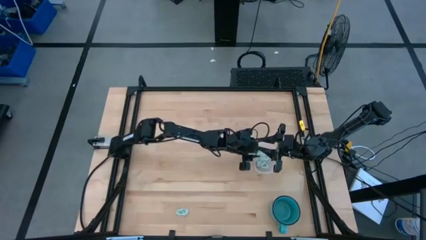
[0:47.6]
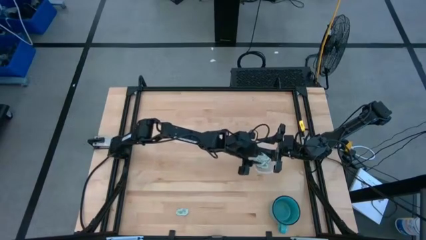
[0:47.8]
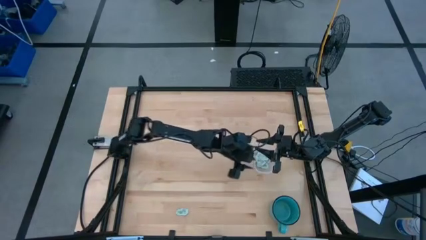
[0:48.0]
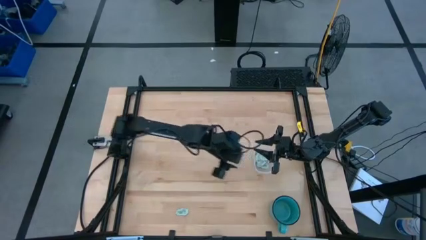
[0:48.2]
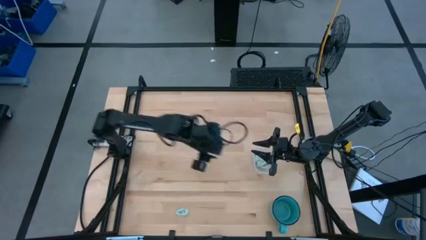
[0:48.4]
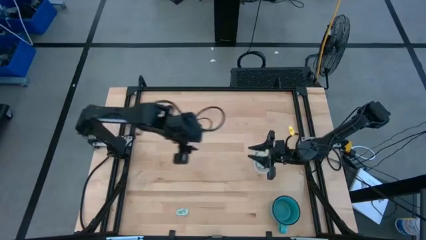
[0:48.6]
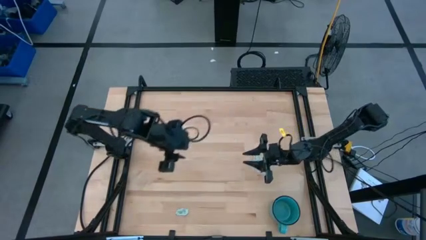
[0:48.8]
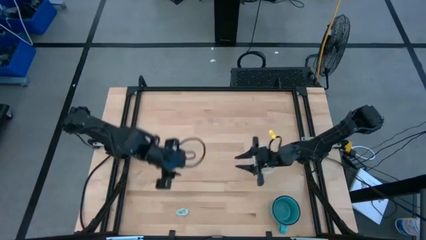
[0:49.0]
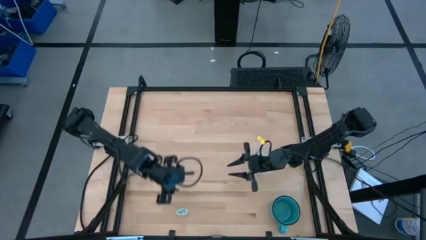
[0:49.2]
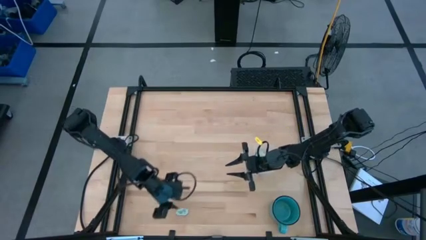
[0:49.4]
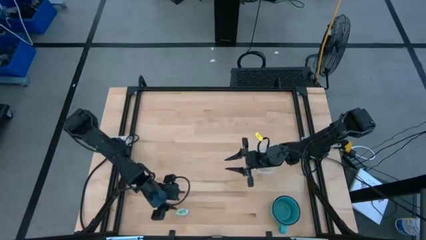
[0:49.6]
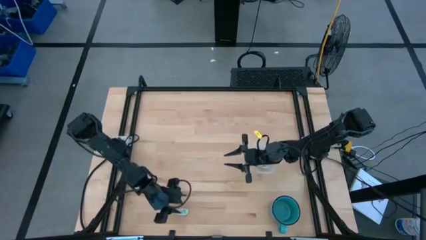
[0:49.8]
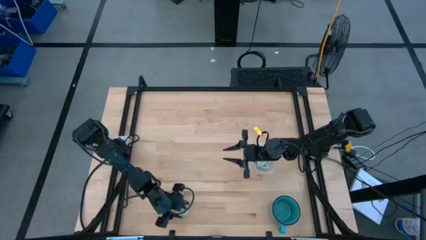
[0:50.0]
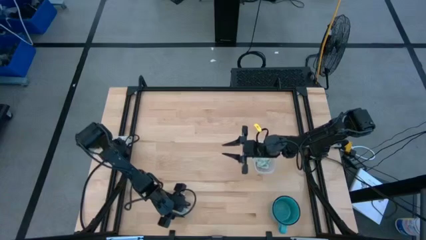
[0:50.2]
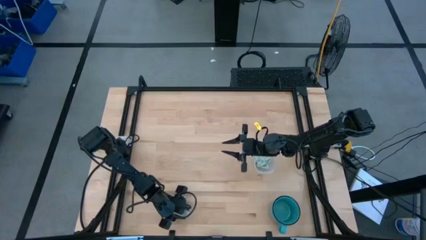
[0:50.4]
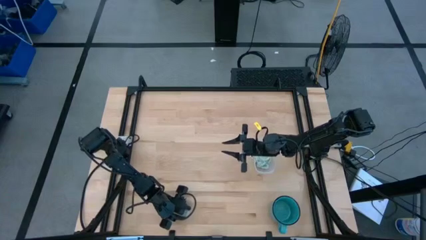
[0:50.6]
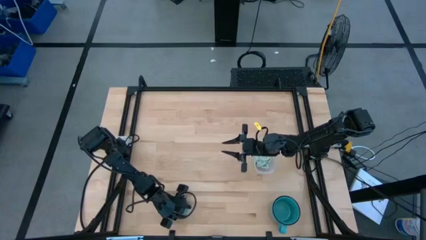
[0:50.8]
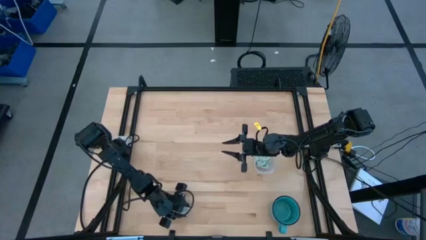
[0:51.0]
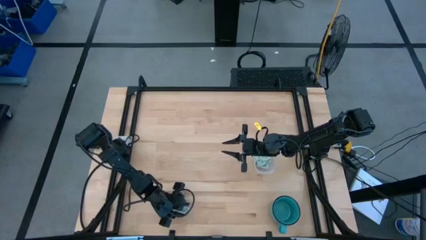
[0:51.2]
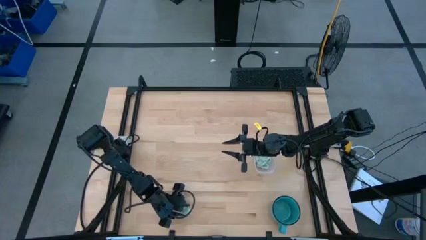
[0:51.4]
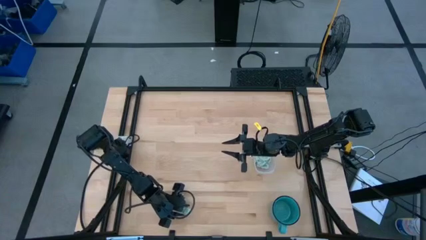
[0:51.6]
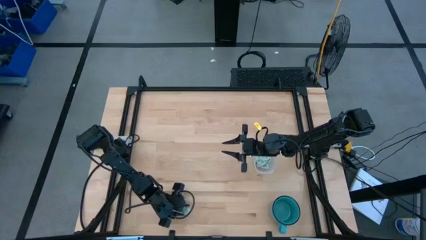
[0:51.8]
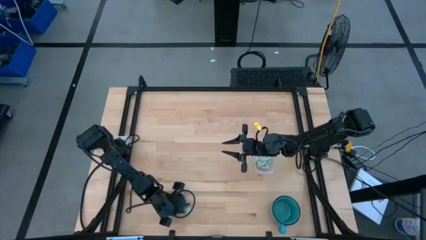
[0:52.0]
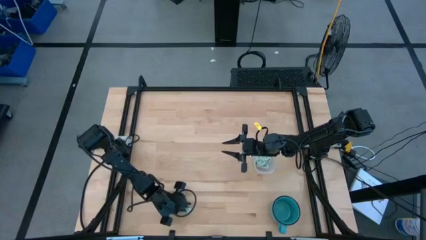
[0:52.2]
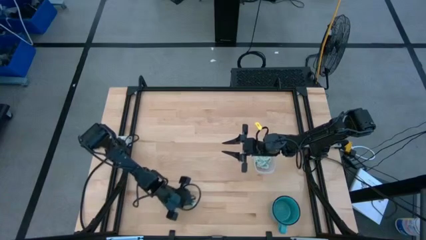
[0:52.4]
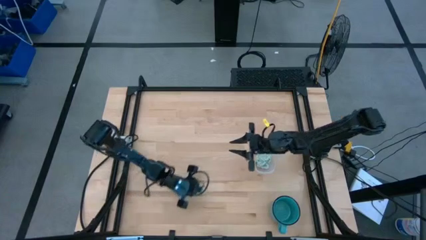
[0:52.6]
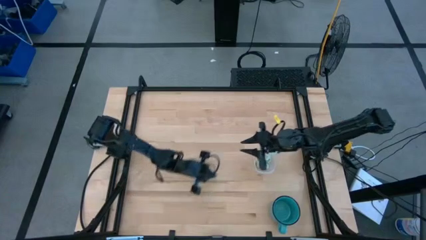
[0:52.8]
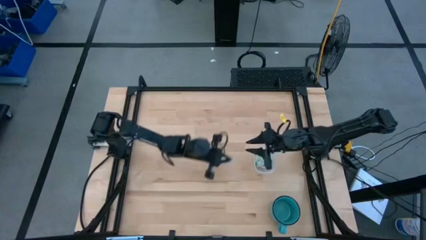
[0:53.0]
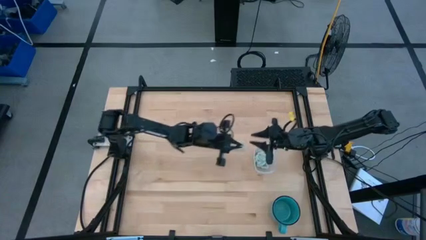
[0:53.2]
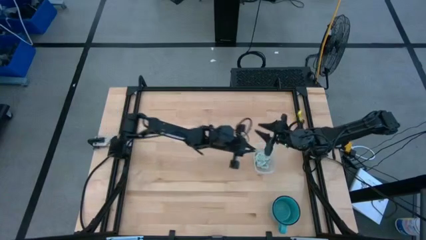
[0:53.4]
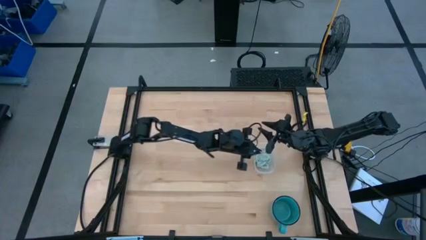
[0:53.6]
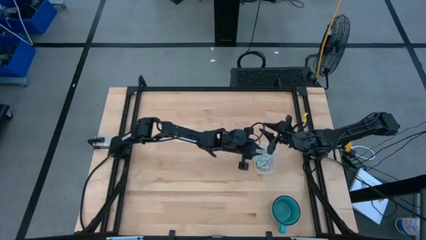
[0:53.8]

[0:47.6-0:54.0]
Task: Pick and place Stevia / Truvia into bins
Put the stevia packet into the bin

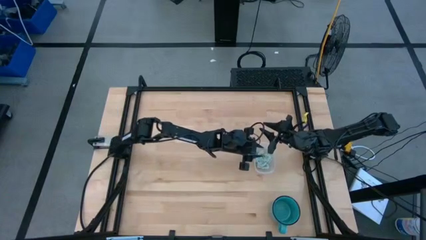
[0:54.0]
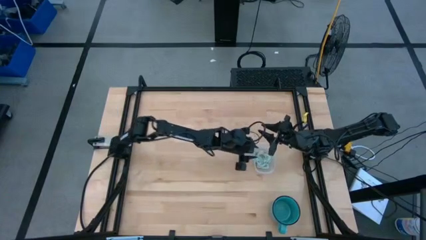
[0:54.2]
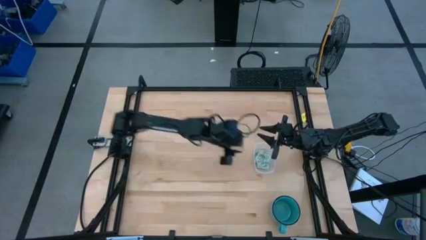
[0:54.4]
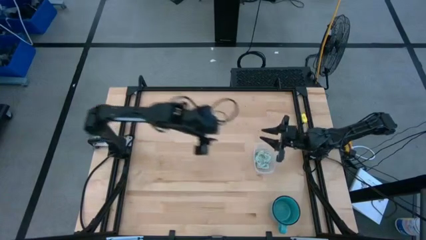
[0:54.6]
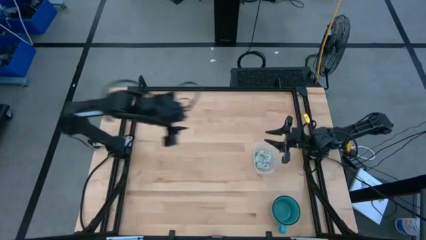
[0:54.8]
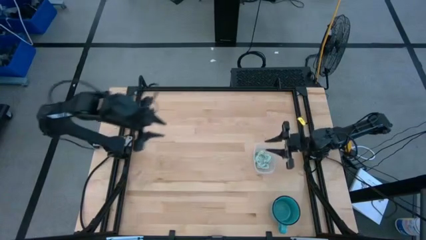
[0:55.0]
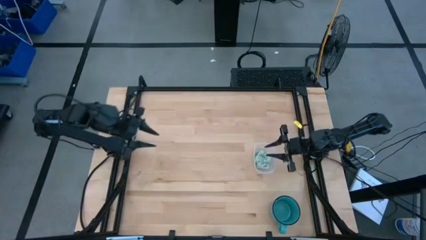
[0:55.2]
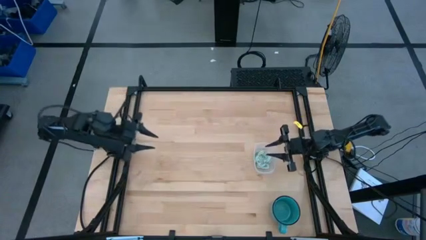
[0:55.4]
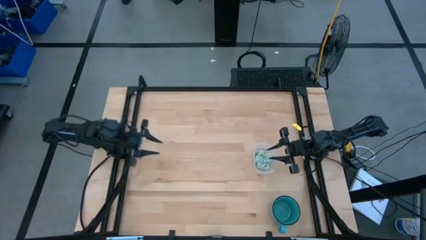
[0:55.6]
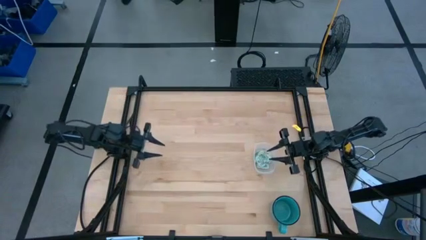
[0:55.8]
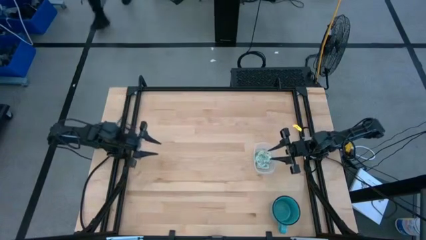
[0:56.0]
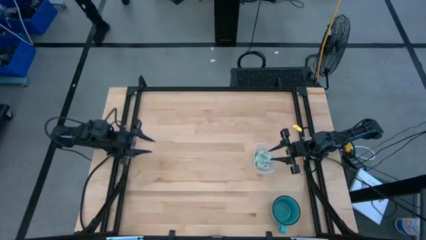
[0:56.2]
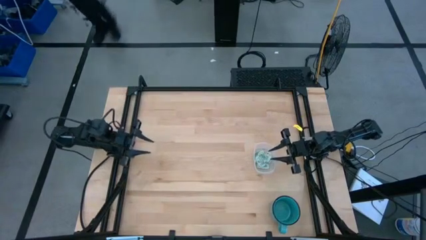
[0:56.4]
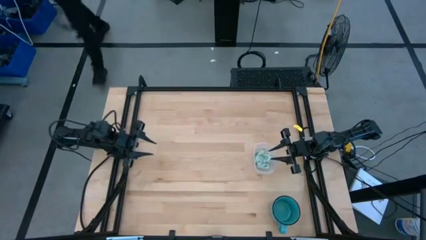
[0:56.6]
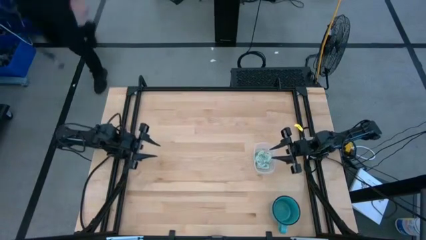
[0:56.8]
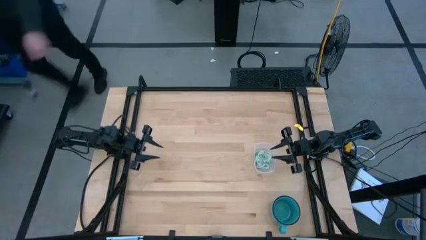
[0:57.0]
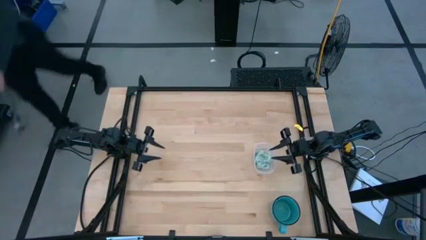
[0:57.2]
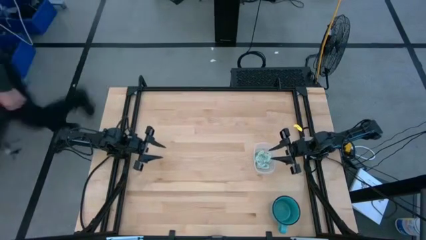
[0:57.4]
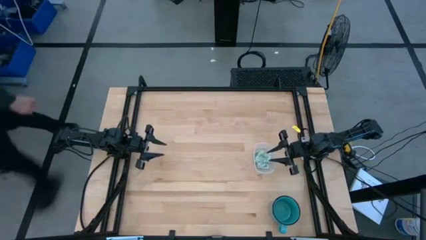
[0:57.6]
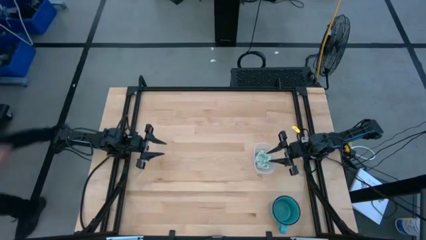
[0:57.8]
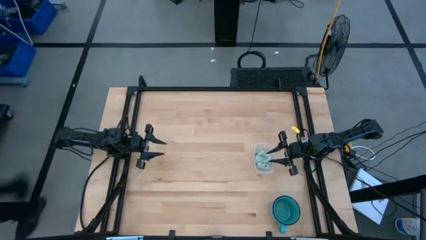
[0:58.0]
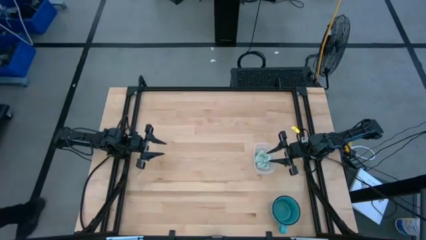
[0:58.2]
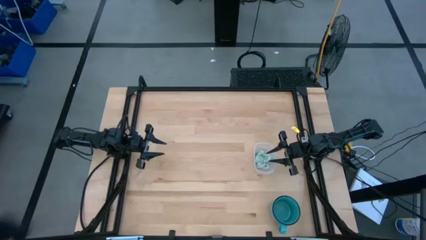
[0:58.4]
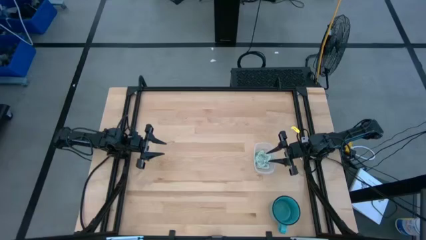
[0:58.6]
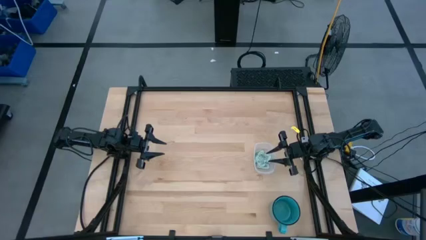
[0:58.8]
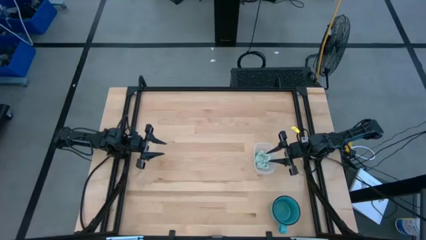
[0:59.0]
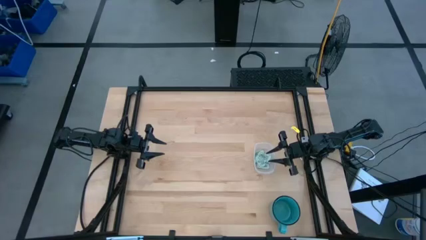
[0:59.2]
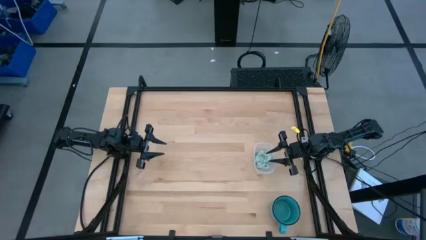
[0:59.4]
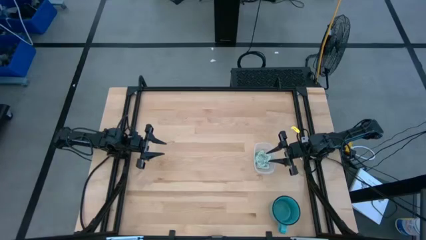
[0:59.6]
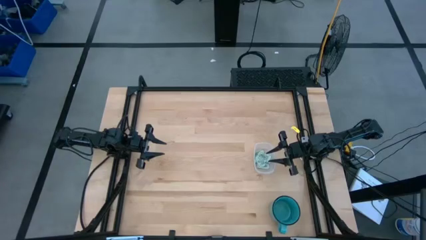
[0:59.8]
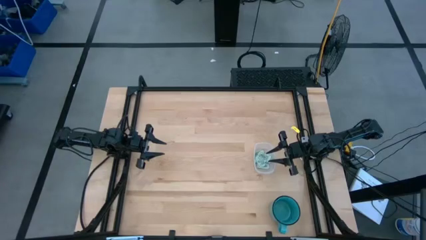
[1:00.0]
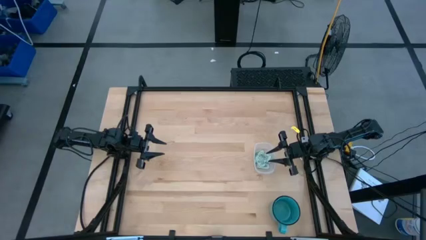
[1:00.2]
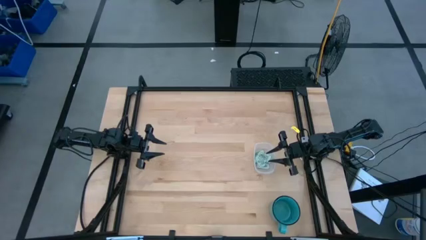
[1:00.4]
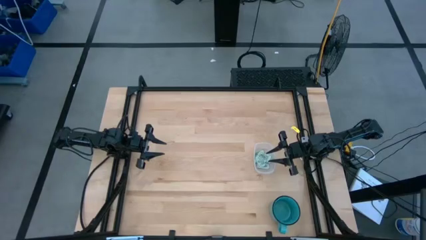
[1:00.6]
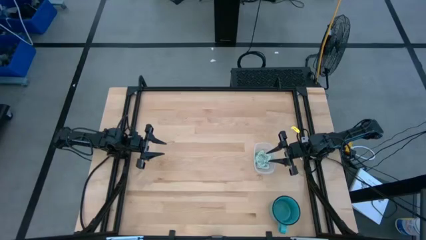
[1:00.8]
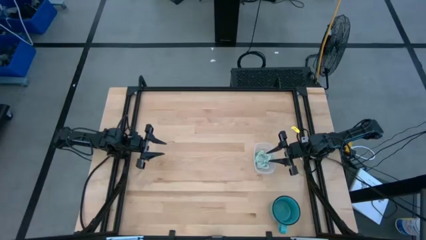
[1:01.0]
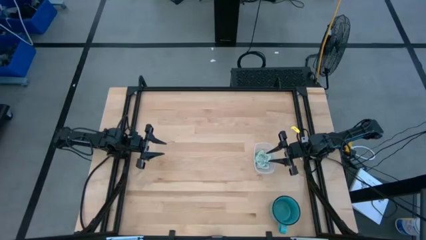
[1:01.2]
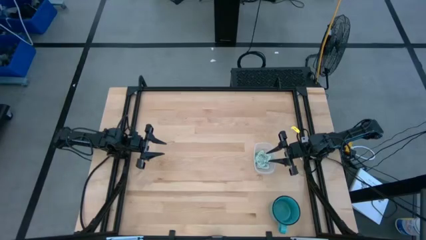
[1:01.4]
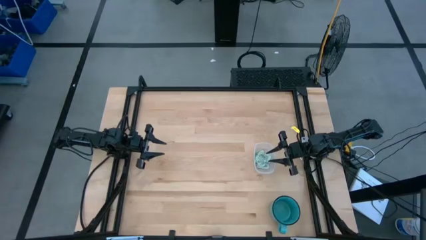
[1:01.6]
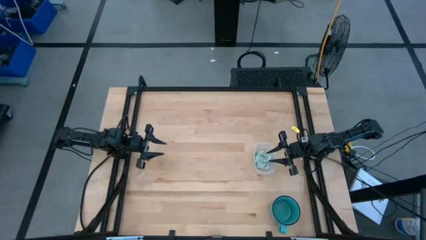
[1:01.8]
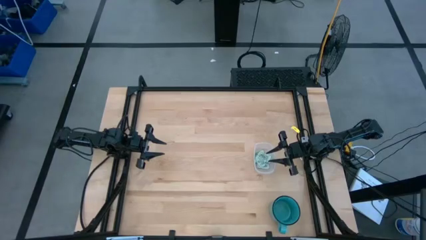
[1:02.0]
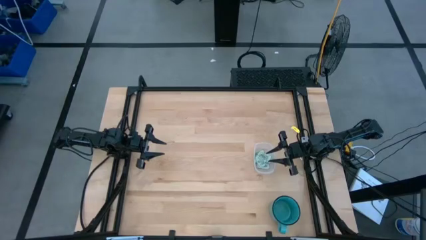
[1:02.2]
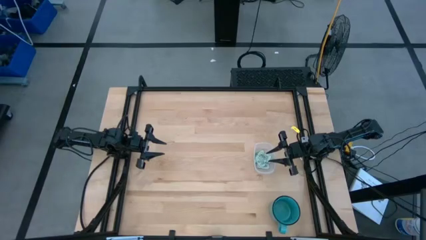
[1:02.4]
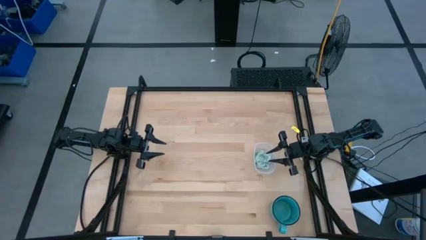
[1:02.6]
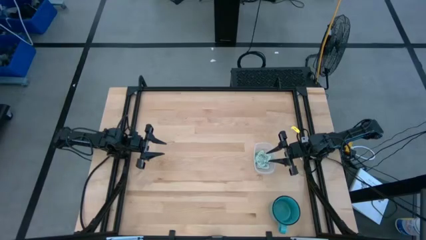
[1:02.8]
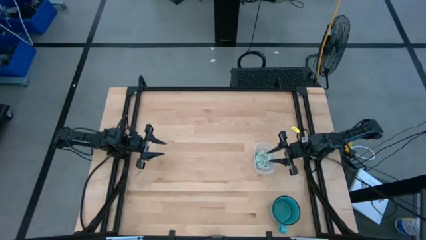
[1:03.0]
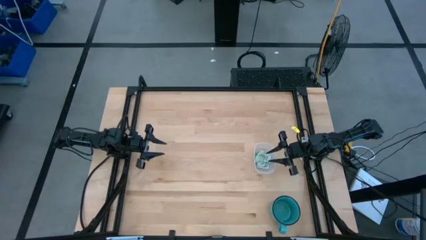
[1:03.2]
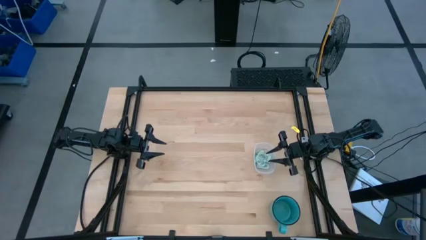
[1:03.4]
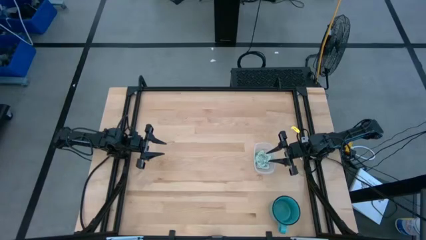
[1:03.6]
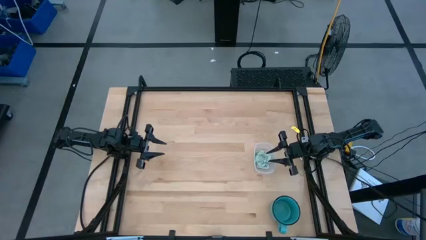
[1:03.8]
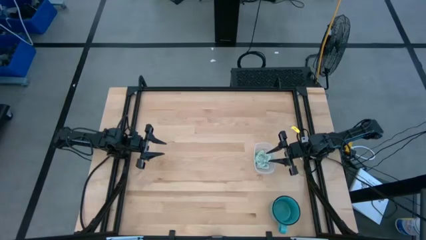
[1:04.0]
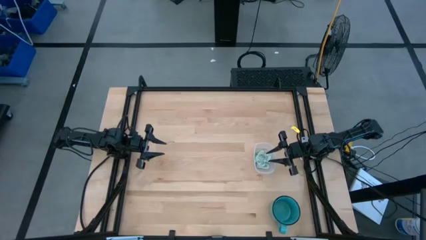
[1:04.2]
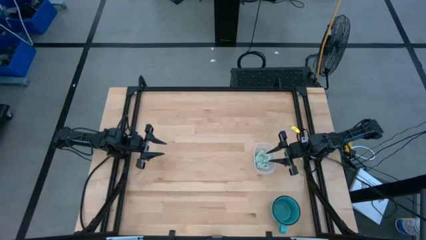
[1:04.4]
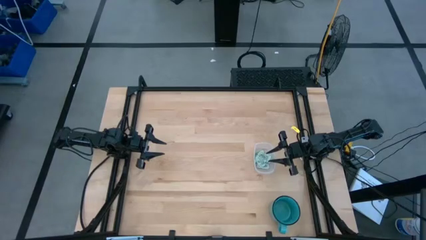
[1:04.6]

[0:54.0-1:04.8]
Return to Home Position

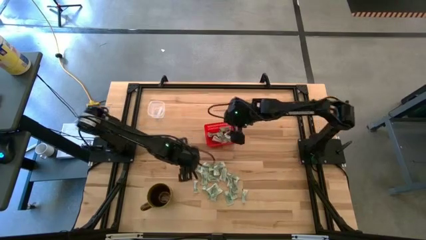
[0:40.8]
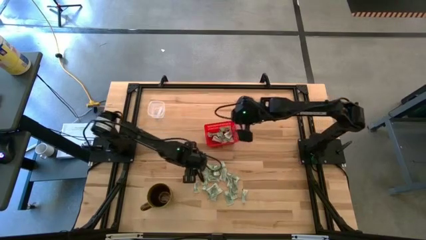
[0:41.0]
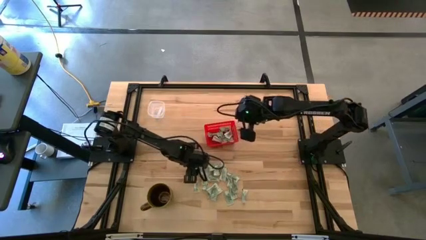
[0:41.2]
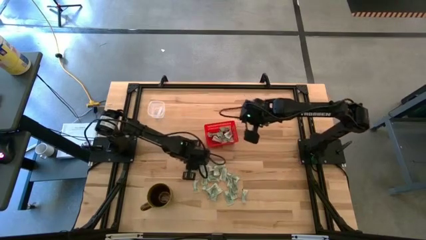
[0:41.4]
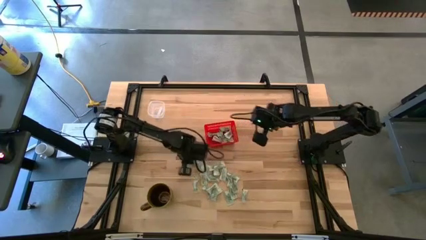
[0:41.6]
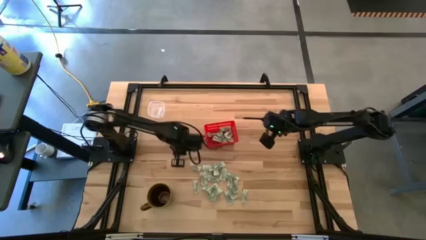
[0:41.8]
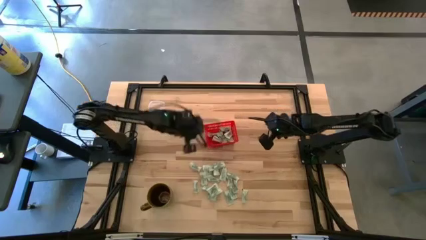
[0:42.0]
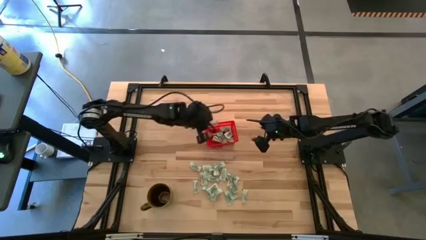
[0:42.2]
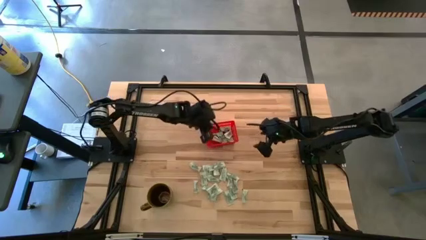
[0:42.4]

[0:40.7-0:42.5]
Task: Pick and place items into bin
Put the green stevia packet into the red bin
